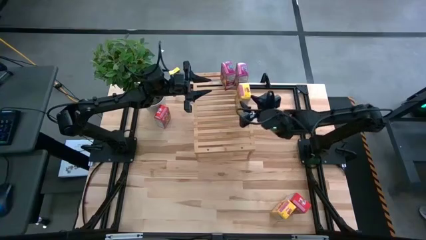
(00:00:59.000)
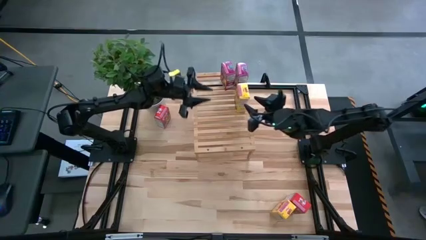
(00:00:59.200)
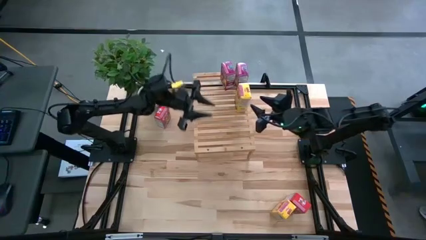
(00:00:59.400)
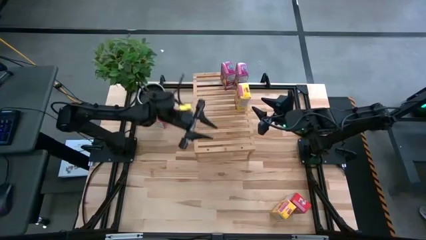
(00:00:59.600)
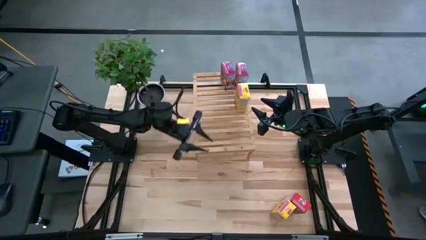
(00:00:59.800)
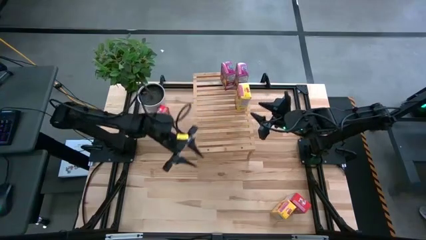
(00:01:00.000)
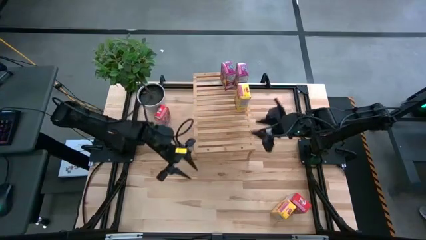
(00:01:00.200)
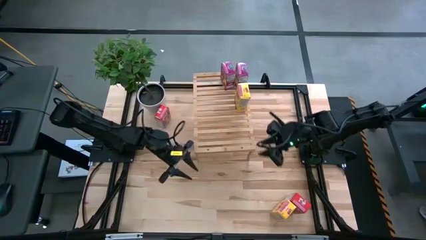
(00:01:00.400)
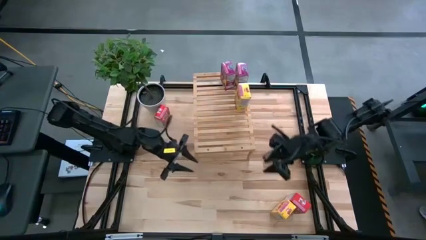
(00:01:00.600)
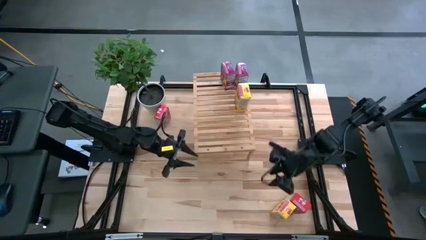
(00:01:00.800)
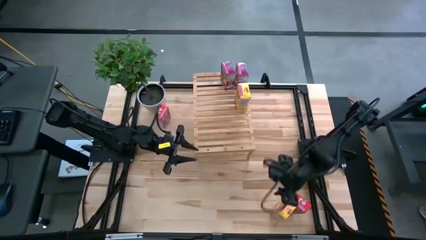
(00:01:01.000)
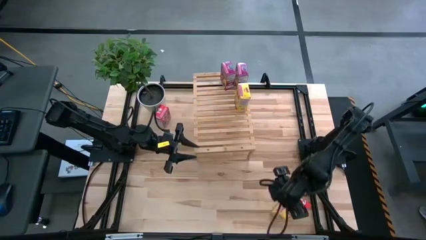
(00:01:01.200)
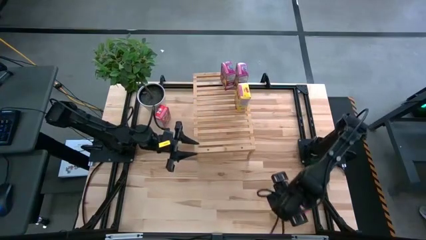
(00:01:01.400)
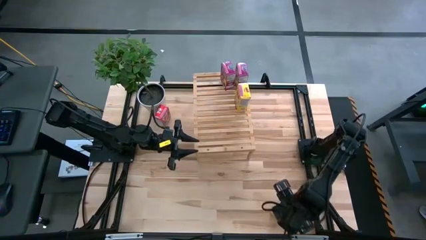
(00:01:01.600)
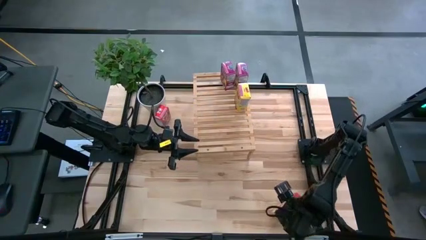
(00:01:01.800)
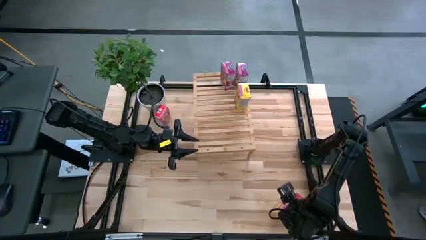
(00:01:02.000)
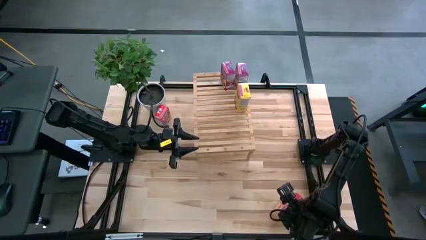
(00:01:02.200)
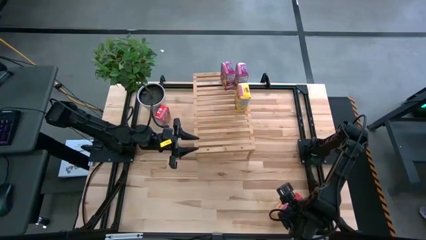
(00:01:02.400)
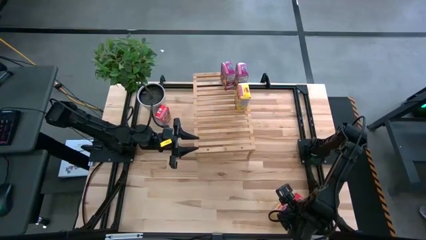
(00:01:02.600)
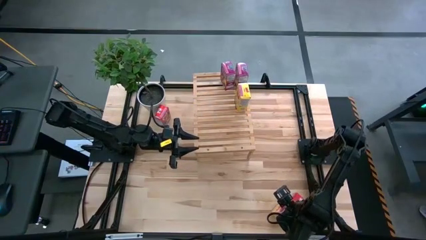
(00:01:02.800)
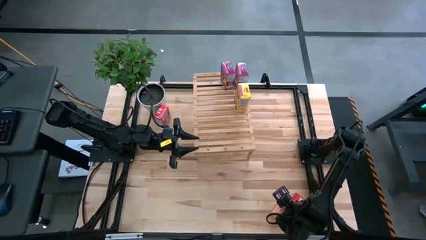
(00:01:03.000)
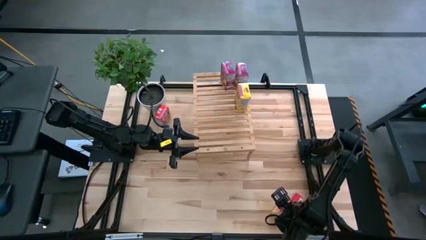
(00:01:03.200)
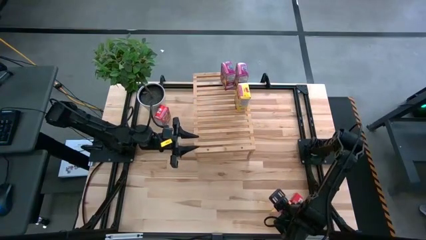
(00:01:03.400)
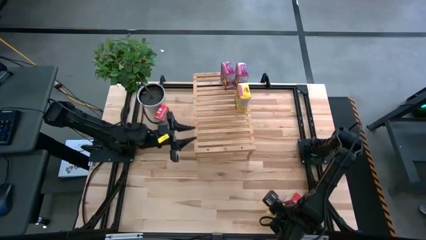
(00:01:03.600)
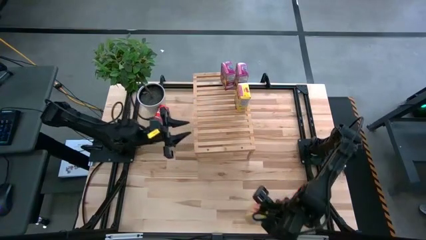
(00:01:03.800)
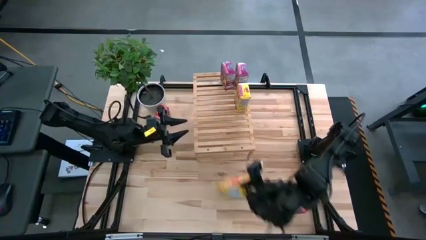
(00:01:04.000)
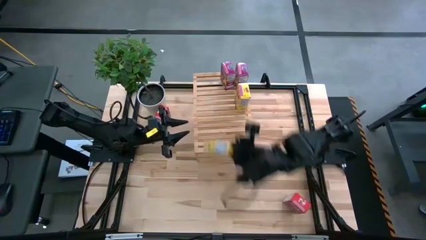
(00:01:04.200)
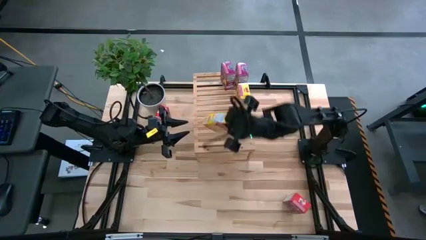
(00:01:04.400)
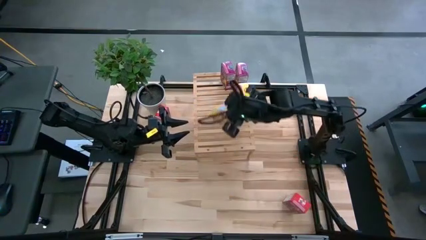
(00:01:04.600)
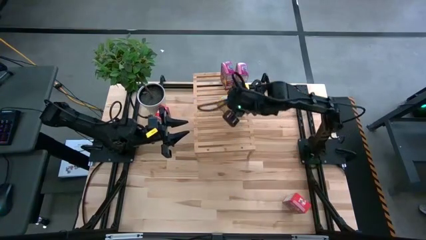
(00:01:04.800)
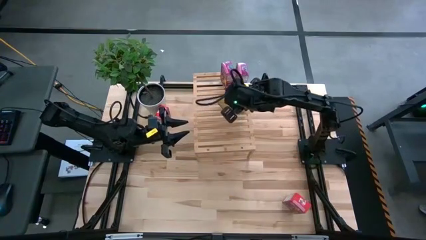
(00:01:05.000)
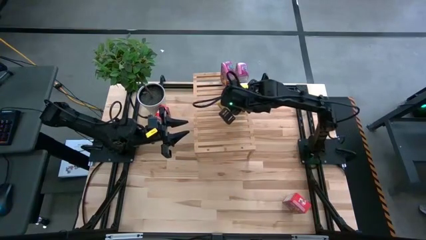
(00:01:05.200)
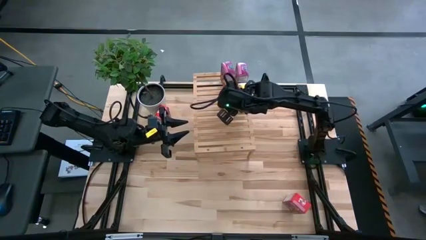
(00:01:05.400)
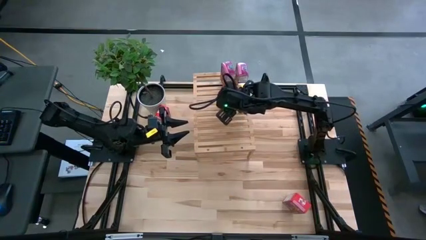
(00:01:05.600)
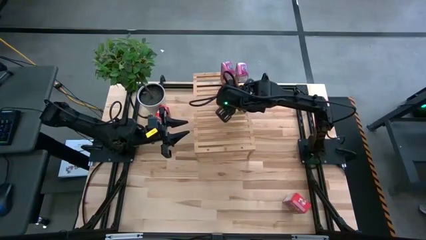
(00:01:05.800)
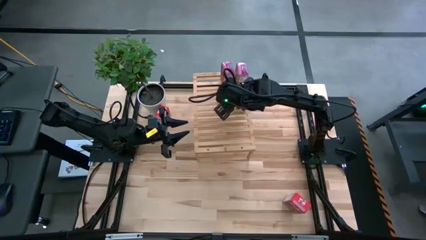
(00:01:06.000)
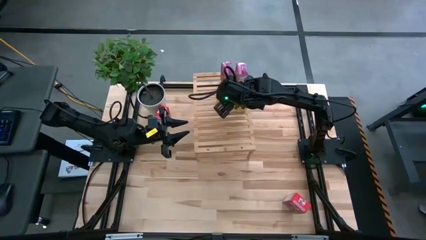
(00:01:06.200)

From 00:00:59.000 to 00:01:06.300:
Task: Stack cereal on shelf
Put the yellow cereal box on the shelf aligned with other yellow cereal box

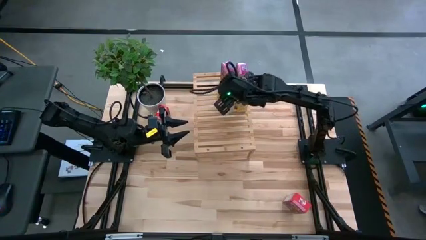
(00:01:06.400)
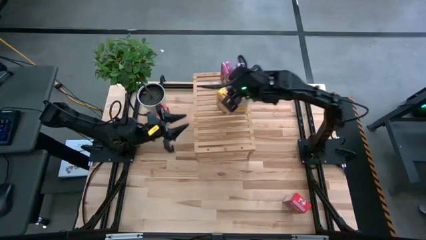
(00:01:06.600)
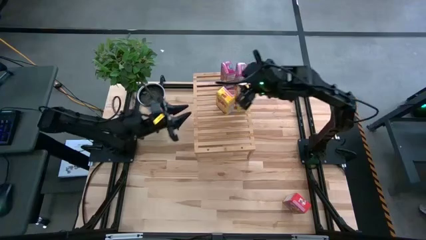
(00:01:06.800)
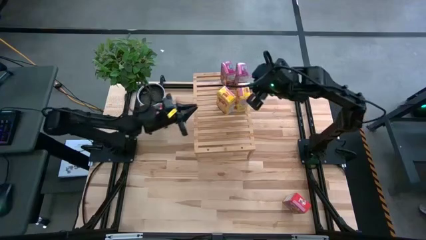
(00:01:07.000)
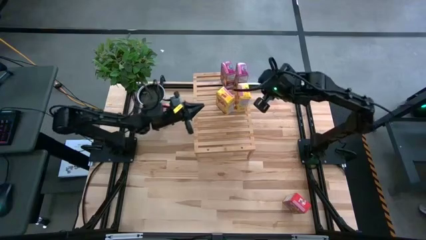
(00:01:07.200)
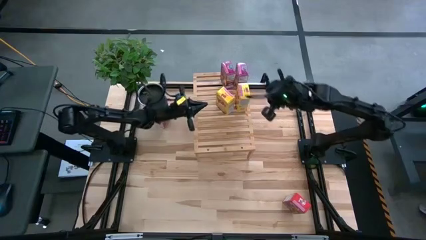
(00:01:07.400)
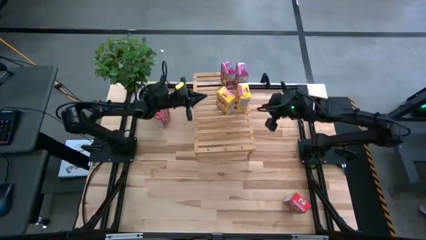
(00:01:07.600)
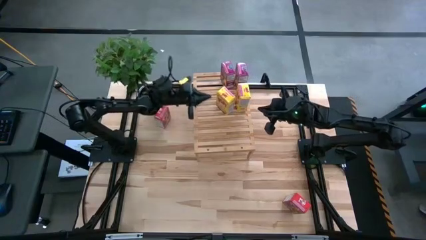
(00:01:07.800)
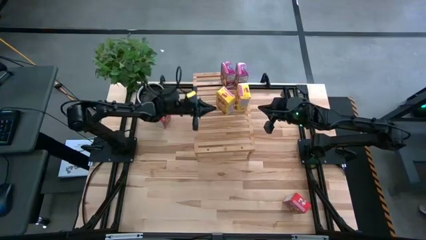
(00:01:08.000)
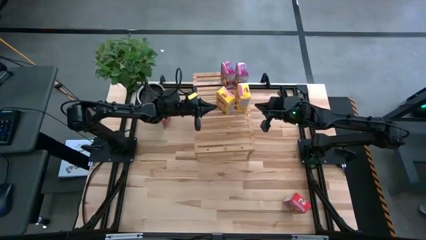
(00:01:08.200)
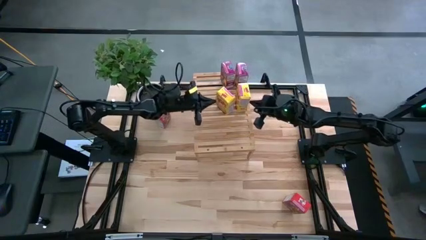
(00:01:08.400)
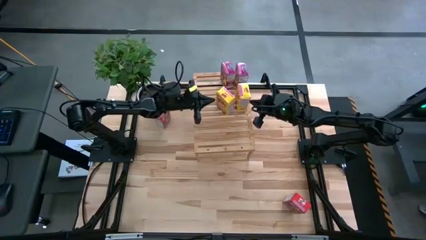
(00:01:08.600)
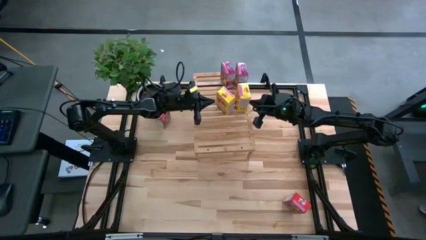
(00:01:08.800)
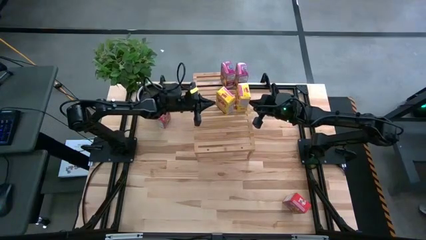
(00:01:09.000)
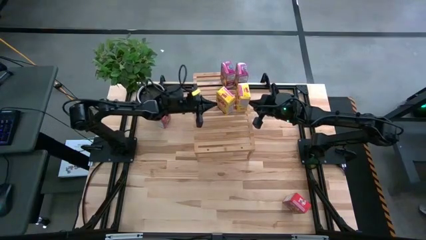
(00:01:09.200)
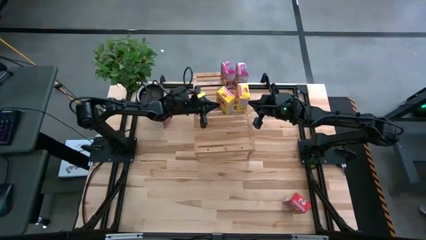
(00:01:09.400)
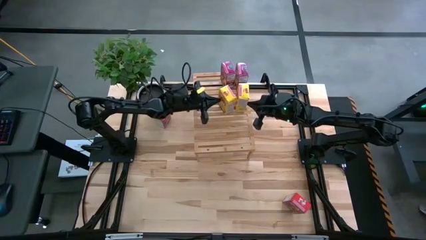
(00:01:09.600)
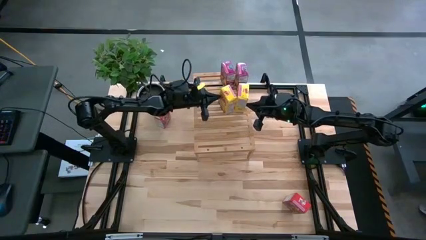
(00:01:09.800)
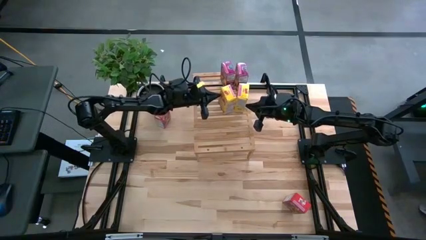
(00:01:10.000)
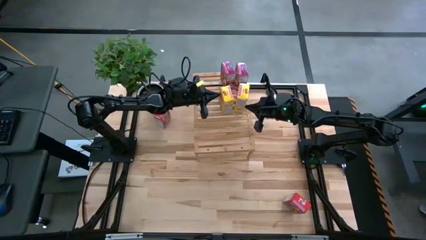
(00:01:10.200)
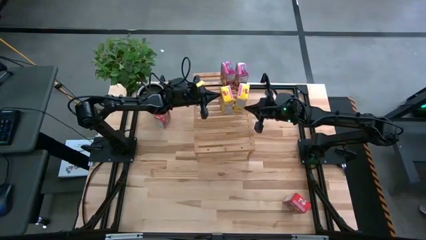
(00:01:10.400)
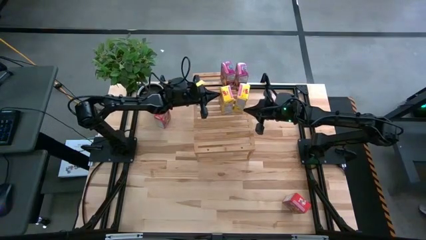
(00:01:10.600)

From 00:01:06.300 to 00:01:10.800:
Adjust the yellow cereal box on the shelf
